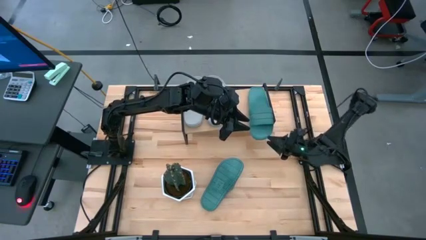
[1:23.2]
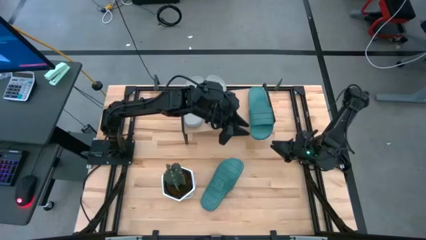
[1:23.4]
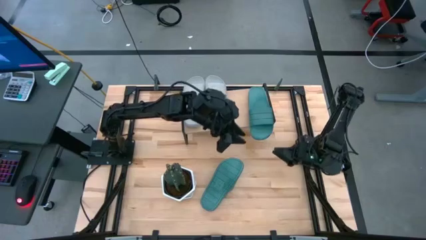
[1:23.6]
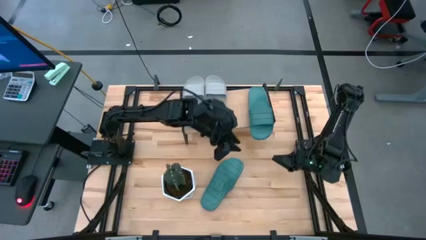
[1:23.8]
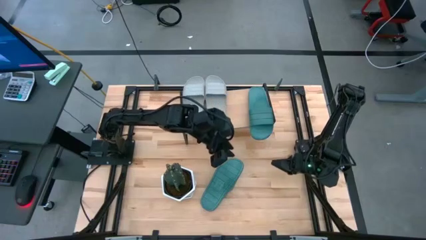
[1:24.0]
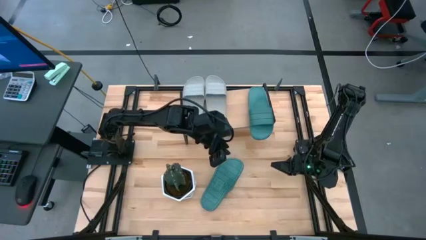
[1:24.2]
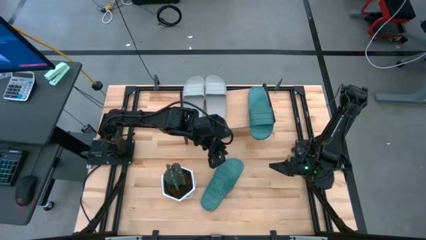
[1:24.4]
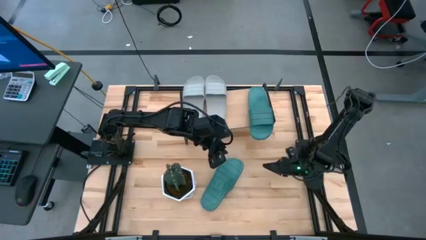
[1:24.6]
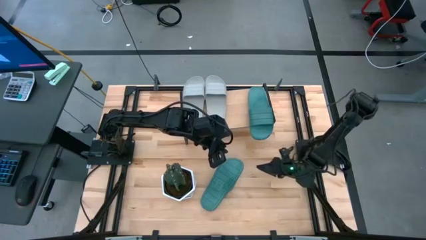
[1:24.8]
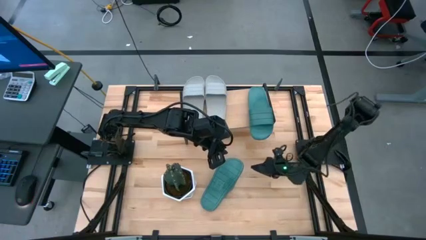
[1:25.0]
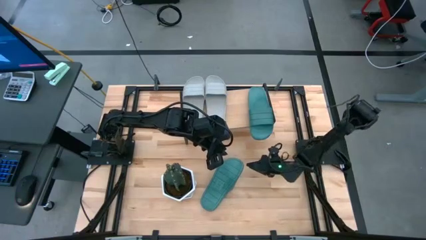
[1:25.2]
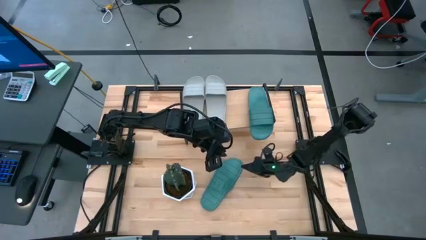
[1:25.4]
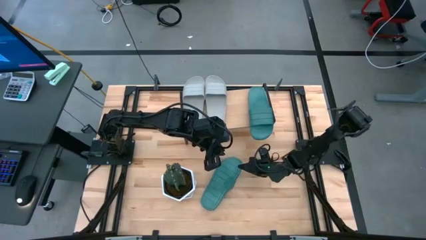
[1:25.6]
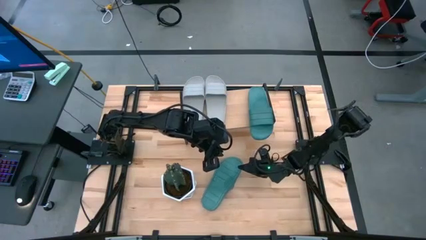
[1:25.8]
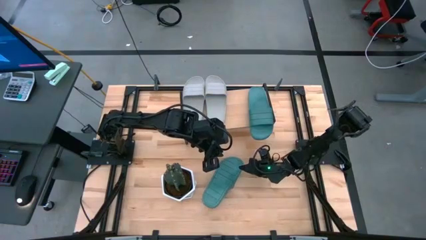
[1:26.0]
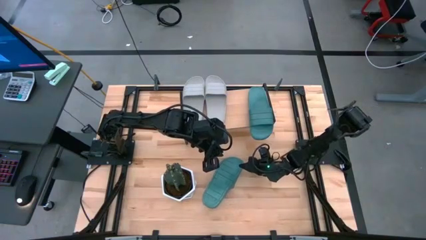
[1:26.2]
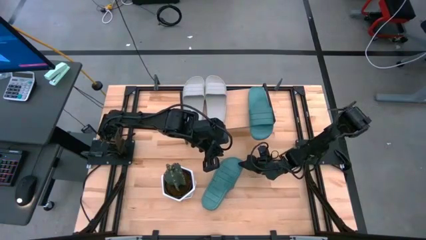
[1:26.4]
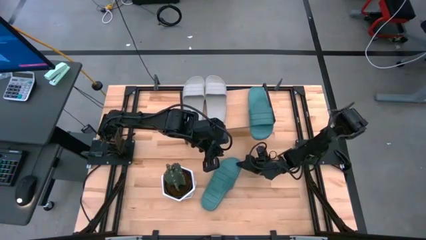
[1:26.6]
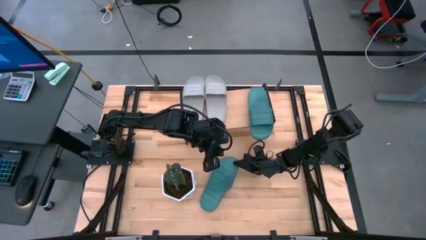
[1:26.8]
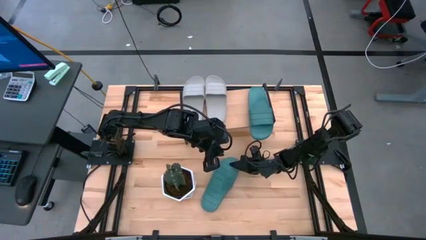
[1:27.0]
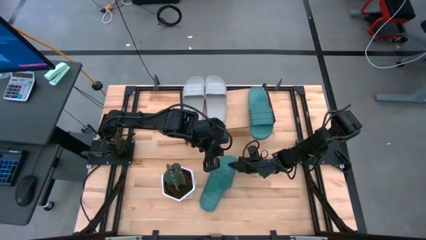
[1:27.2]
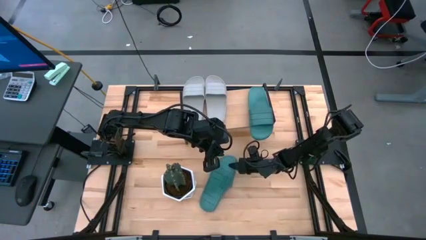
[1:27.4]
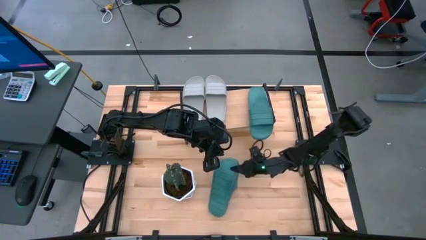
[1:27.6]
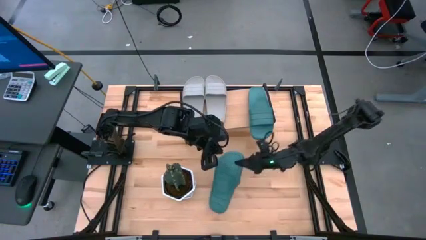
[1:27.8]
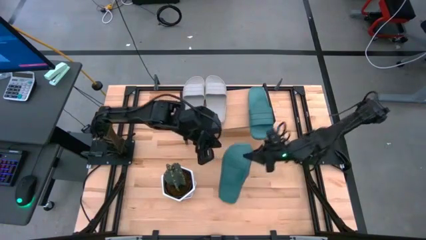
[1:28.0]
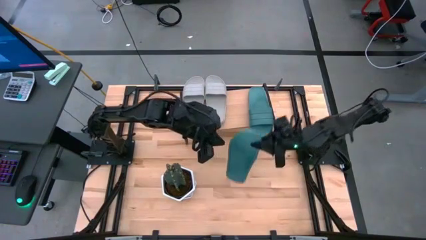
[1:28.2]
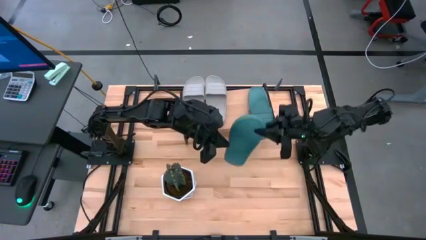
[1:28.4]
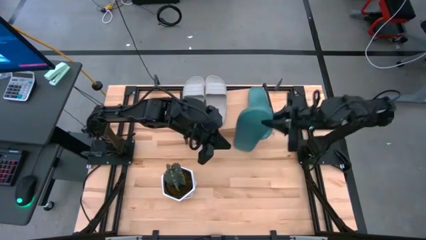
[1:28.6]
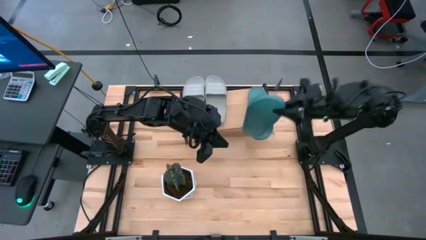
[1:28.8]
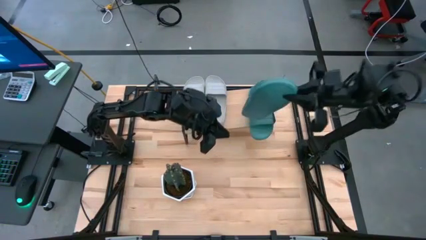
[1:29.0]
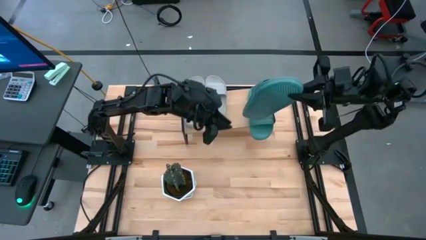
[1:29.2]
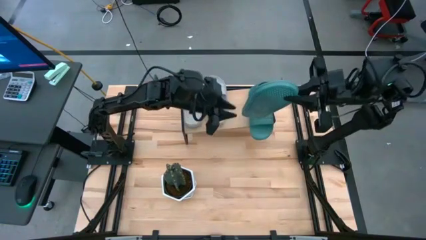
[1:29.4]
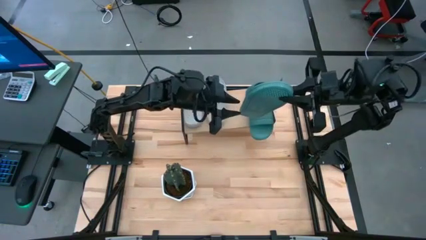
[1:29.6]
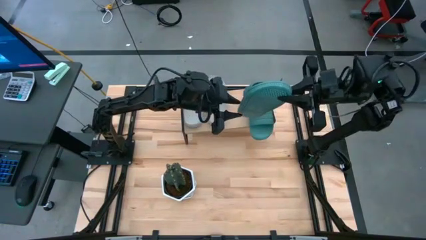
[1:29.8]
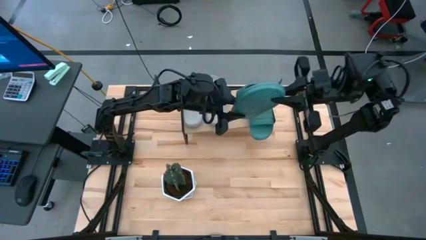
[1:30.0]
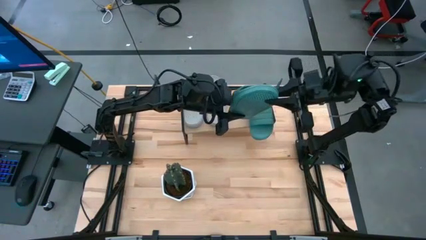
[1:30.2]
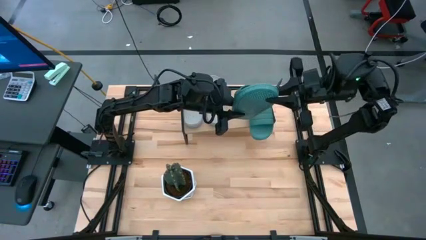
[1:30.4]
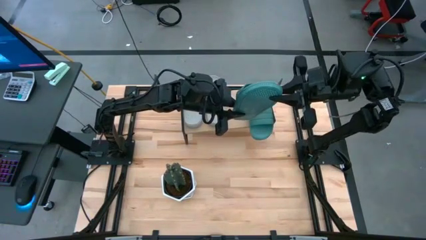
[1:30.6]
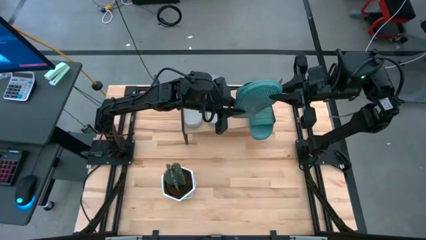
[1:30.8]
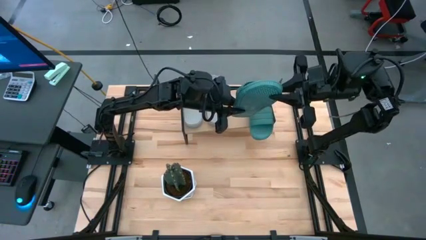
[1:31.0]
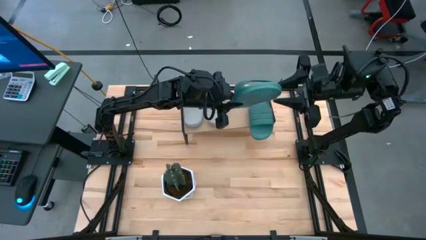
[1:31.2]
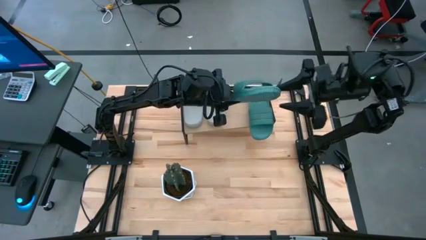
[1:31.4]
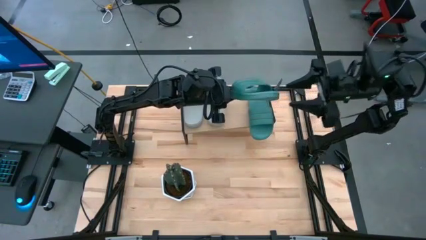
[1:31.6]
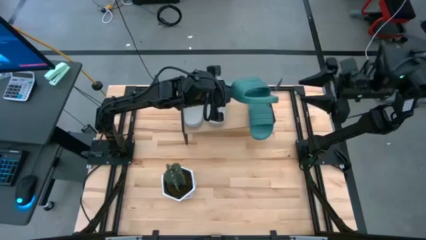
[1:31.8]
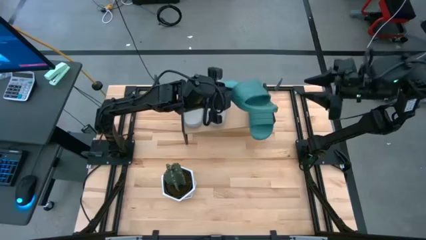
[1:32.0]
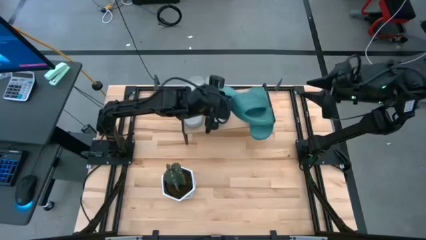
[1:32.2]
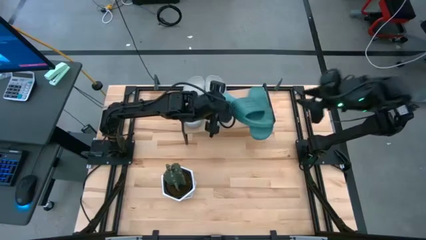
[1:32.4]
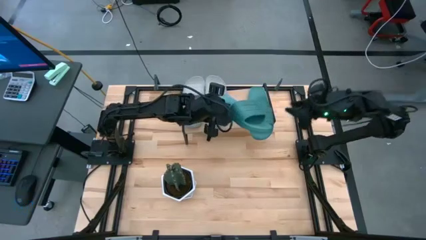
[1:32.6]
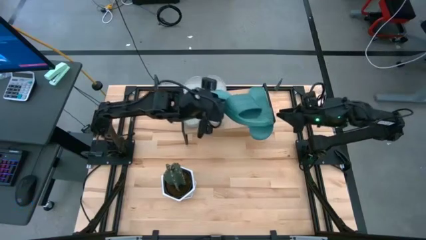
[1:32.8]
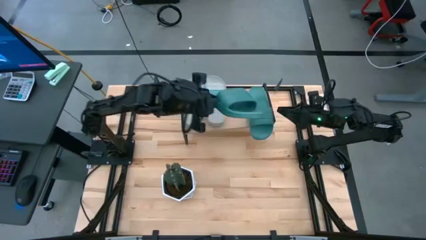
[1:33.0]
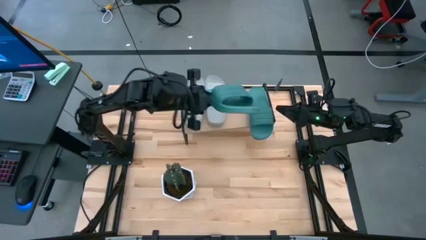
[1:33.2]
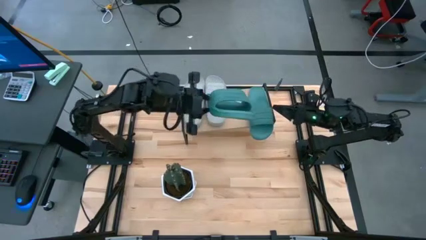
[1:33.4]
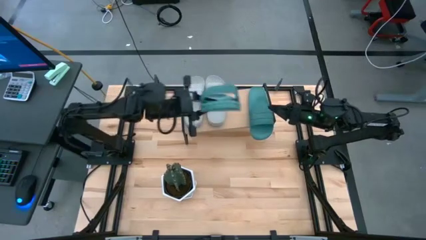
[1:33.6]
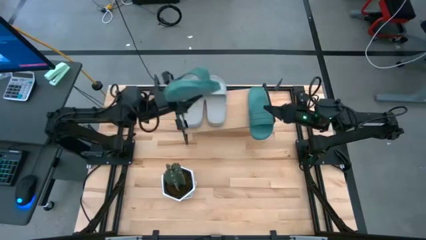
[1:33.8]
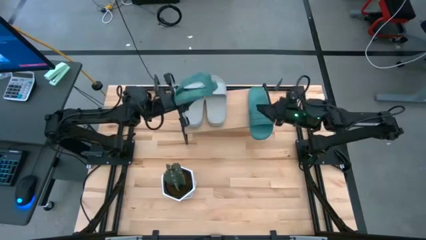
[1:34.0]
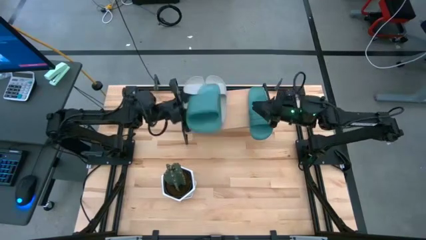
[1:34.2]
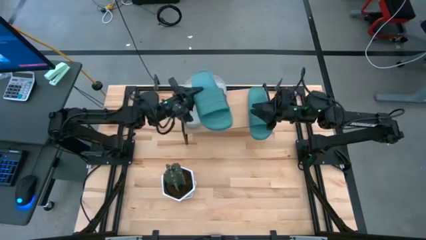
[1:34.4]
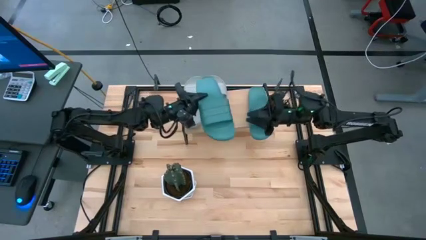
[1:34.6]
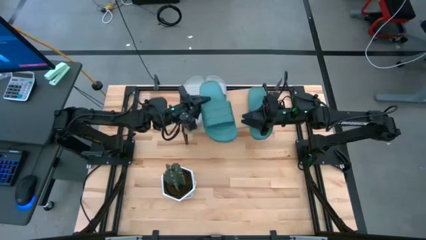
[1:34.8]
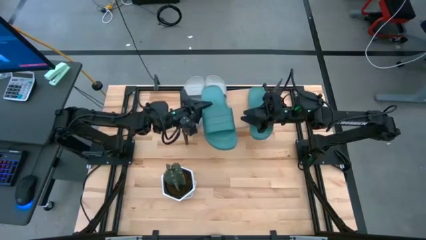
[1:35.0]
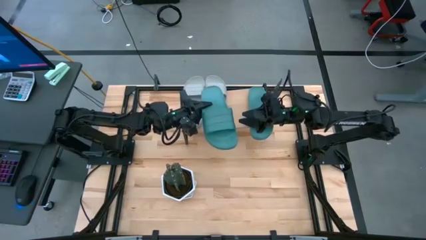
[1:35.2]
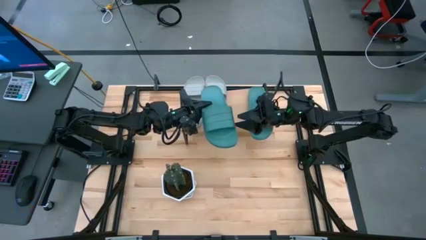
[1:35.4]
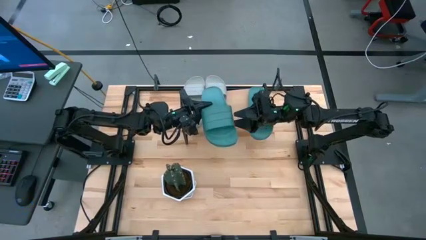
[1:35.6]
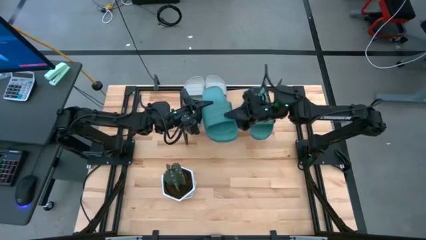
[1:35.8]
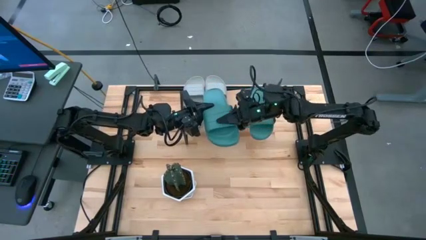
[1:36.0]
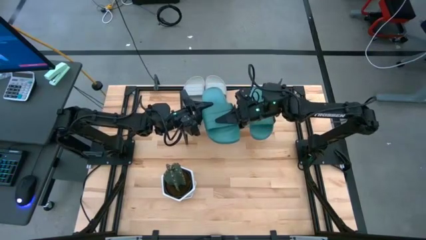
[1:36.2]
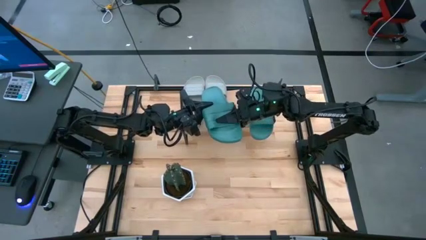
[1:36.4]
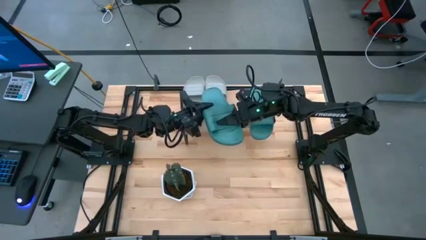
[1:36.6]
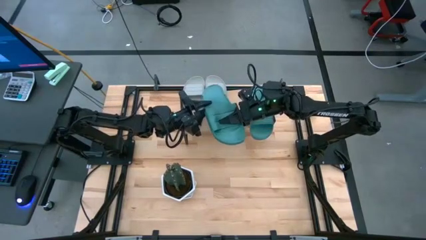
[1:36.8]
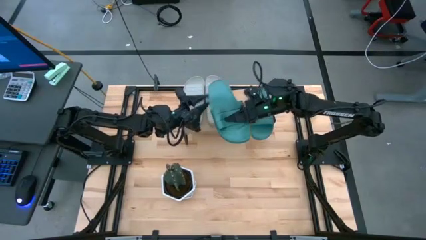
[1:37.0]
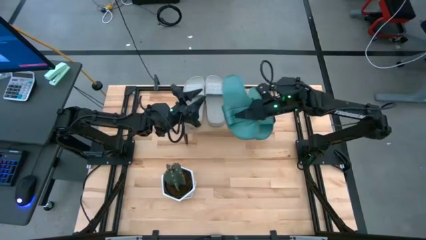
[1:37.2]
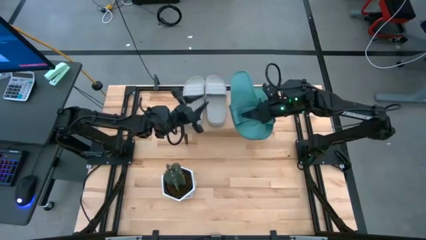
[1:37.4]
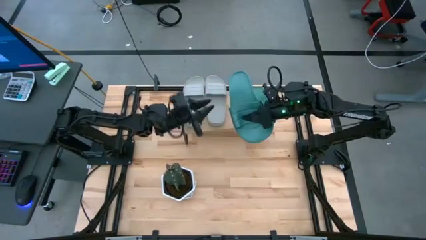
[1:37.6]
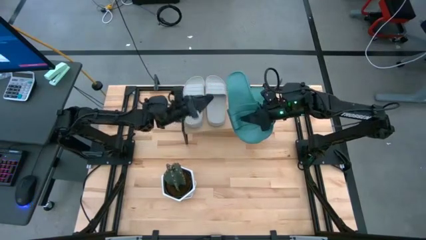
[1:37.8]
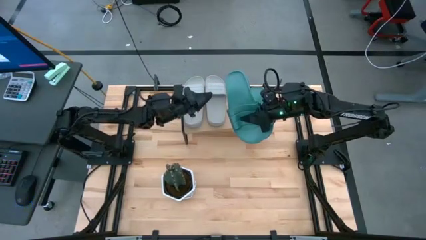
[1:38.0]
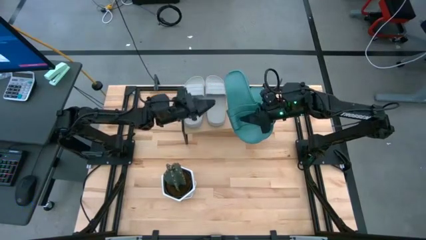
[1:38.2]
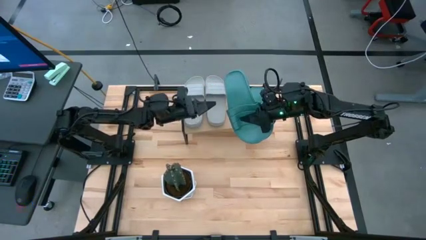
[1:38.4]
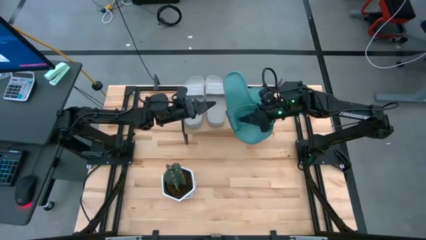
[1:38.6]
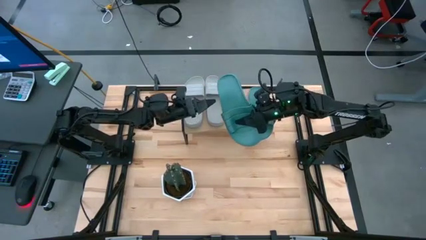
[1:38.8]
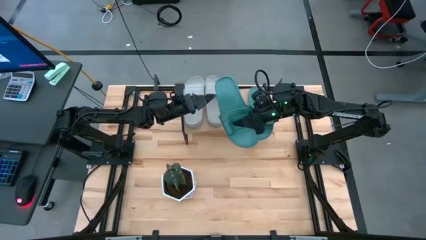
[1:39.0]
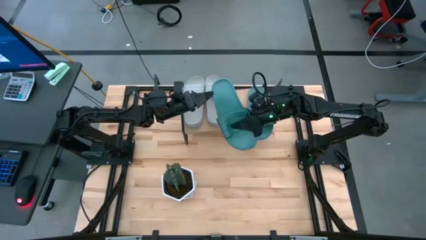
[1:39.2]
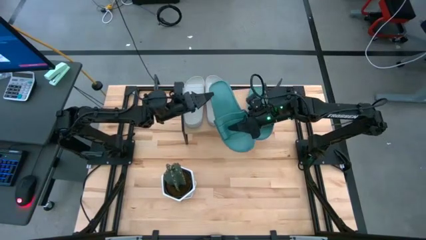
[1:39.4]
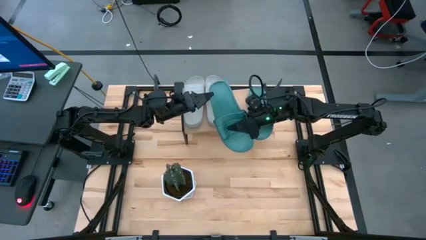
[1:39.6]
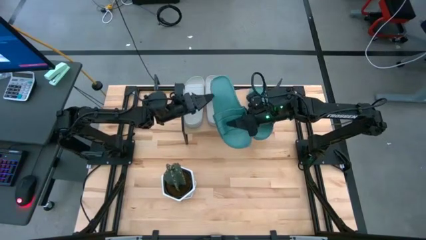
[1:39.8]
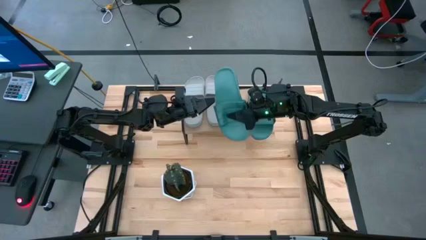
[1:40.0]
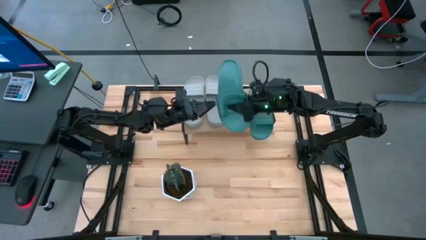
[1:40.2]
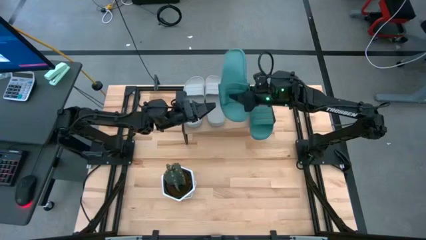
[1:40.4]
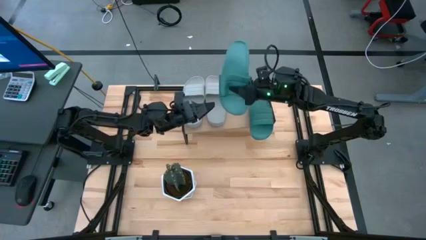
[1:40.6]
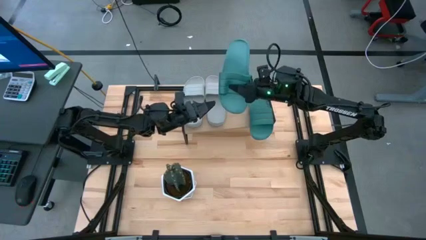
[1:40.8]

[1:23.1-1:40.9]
Task: Pick and place slides into the shelf
Put the green slides on the shelf
